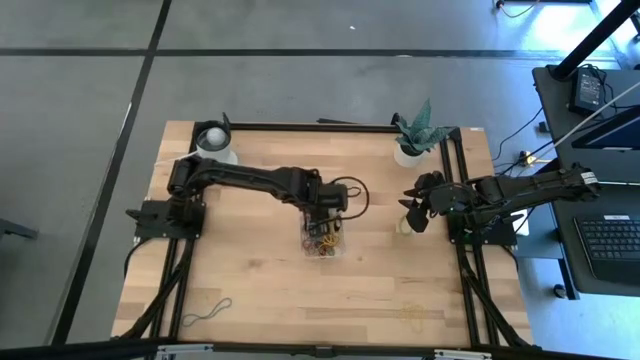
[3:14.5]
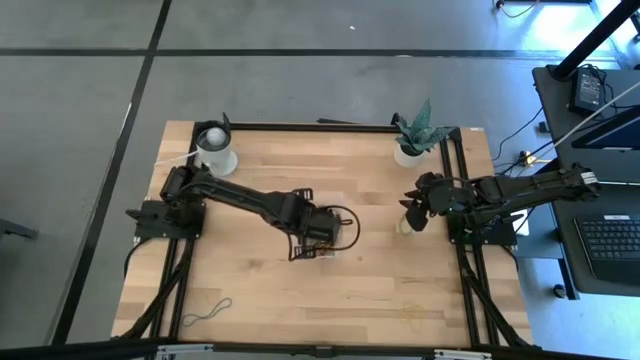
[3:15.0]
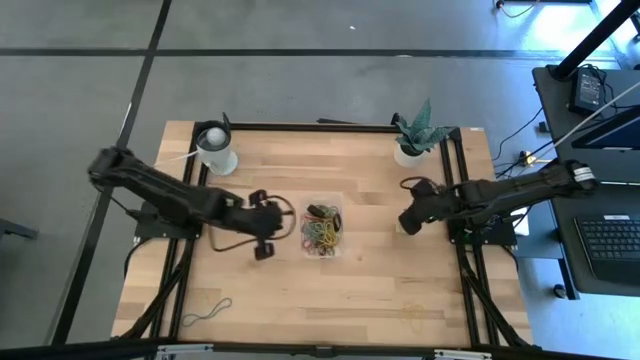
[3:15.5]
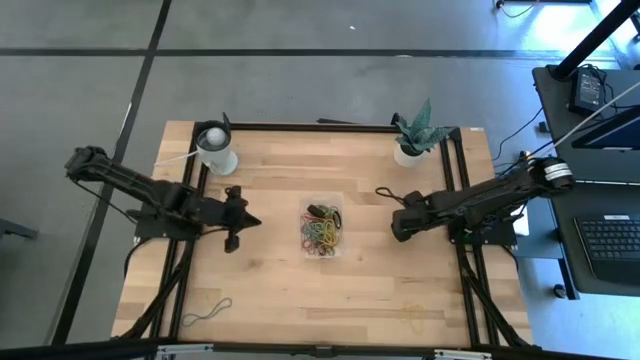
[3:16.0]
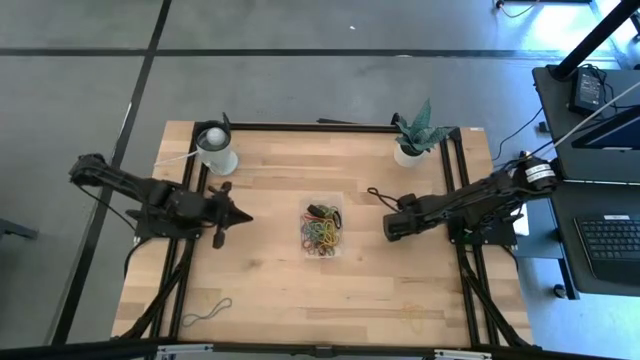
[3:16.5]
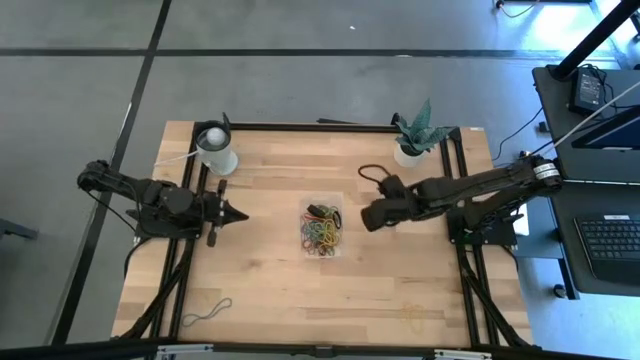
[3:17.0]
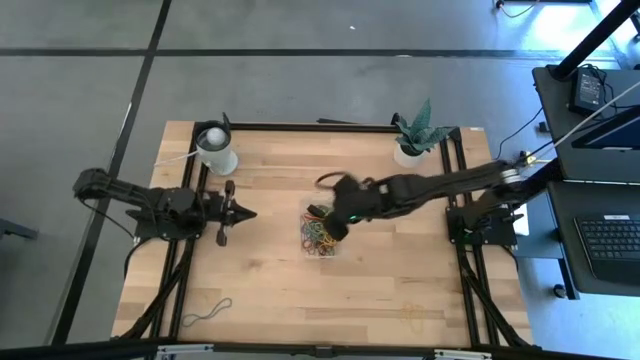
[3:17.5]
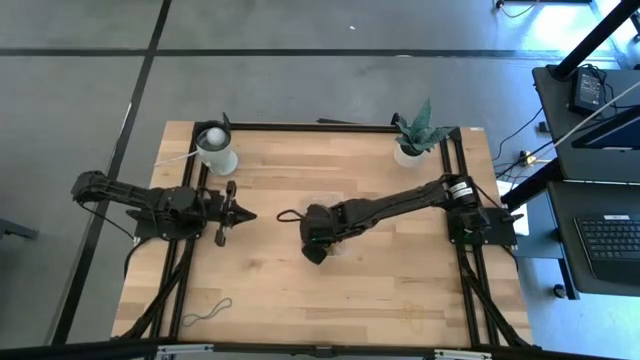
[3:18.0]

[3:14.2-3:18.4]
Task: Pick and place rubber bands into bin
Put the green rubber band into the transparent bin

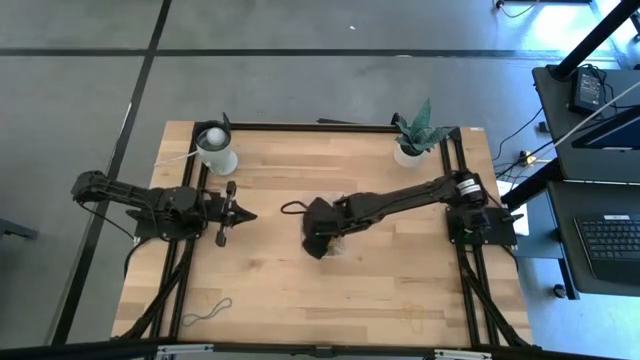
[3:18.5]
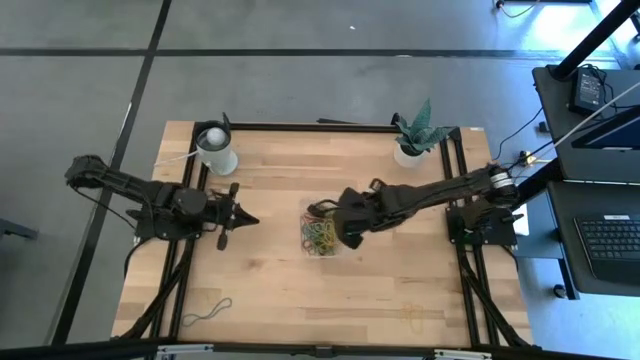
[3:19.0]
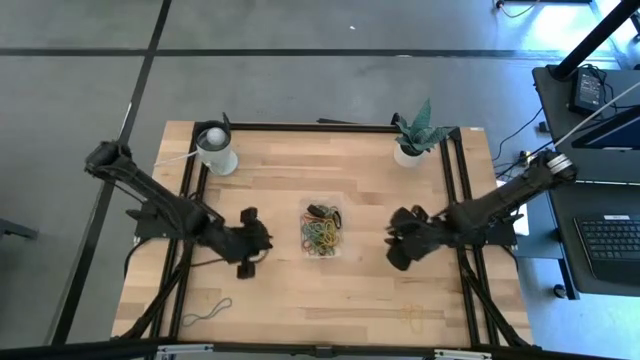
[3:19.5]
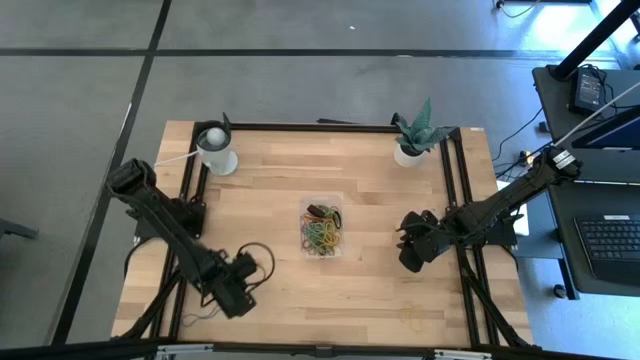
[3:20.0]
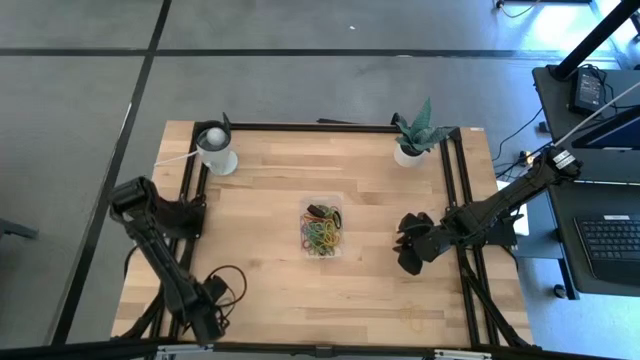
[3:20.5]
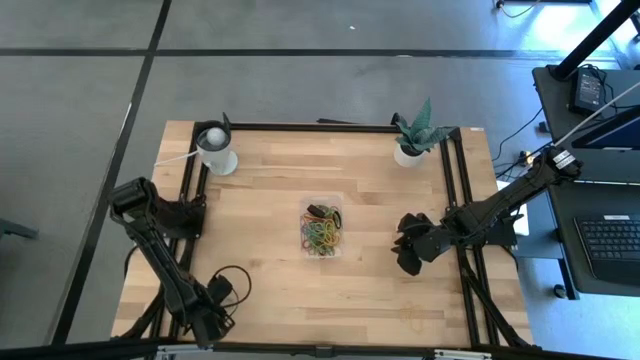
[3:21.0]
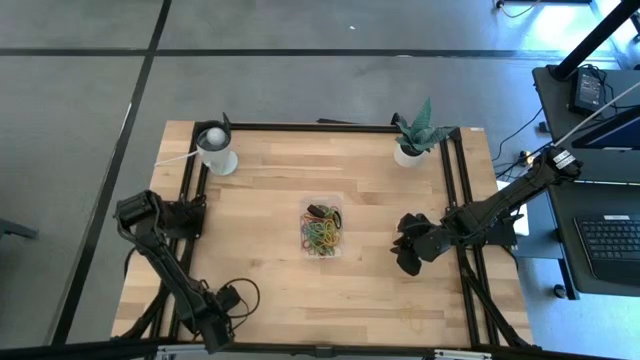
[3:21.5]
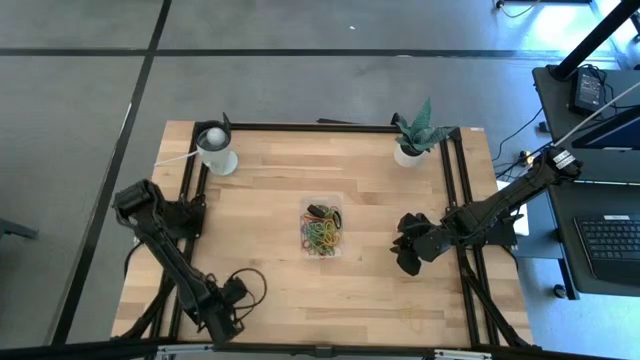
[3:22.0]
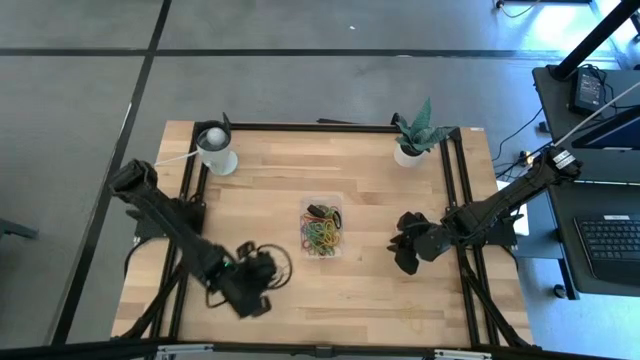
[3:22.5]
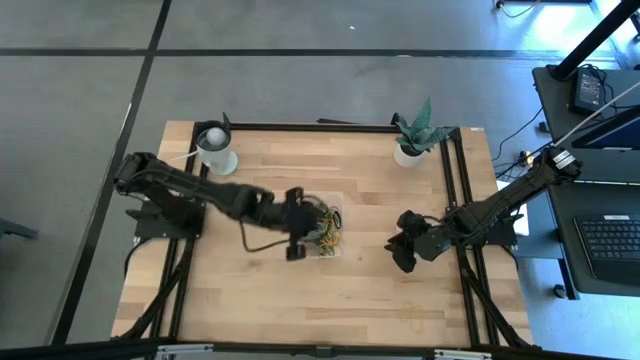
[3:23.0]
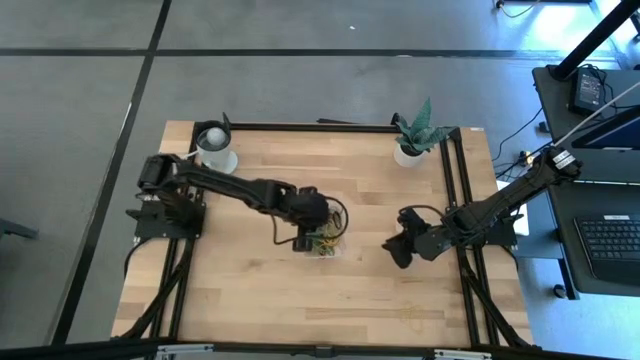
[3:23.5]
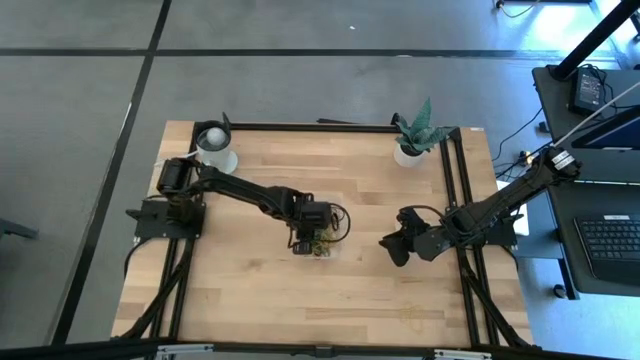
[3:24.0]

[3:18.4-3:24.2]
Put the blue rubber band into the transparent bin

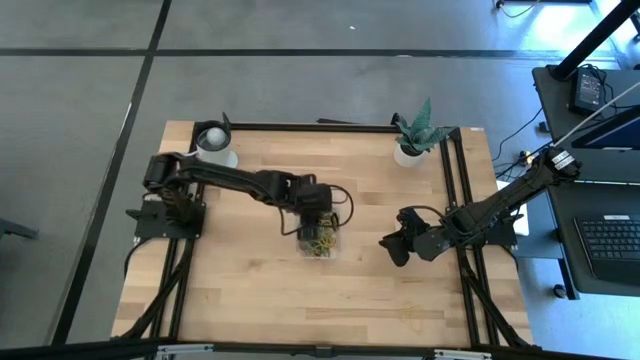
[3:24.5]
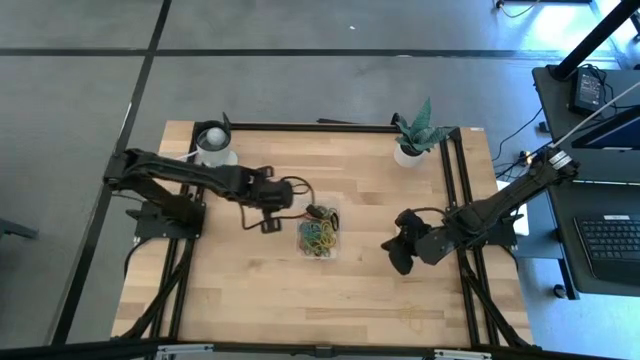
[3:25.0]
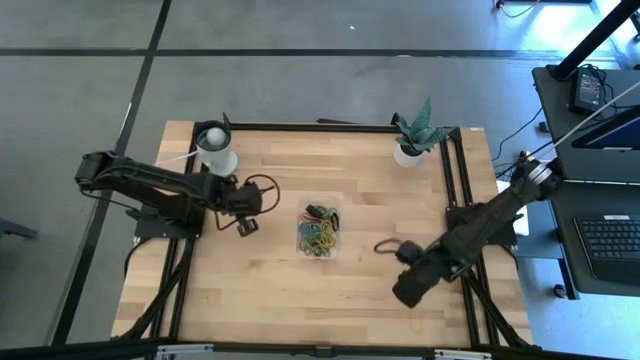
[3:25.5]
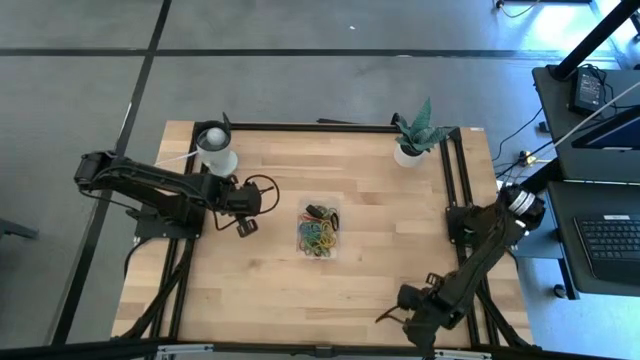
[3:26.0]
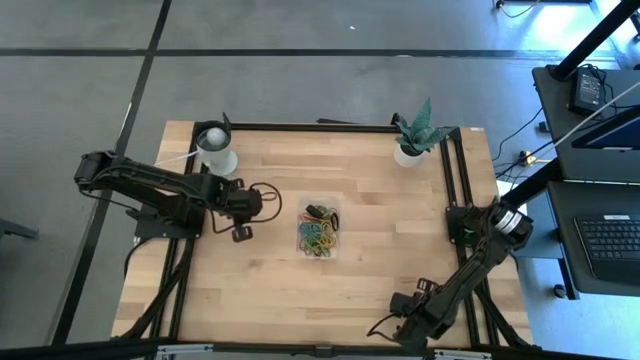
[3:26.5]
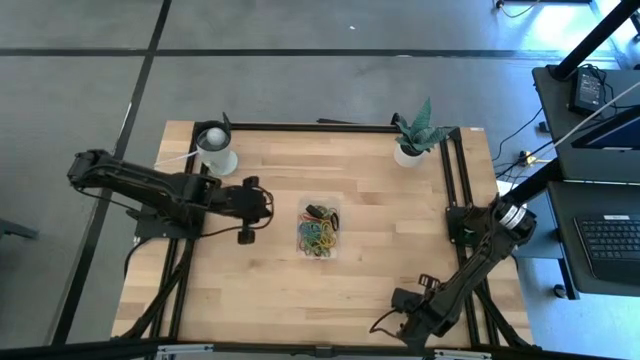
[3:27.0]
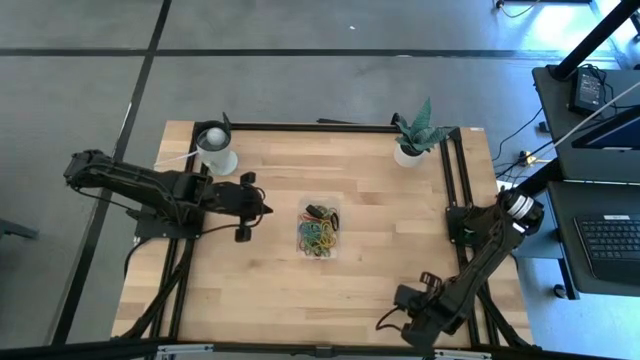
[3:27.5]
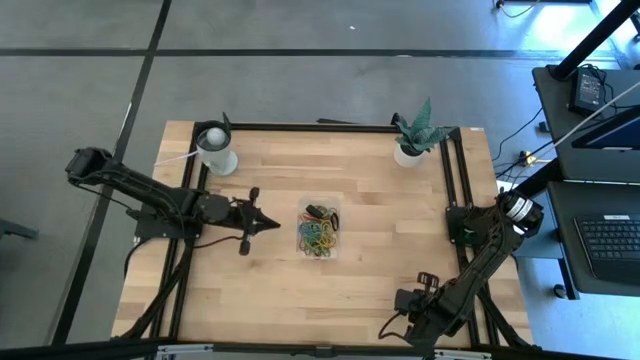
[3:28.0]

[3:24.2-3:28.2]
Put the yellow rubber band into the transparent bin

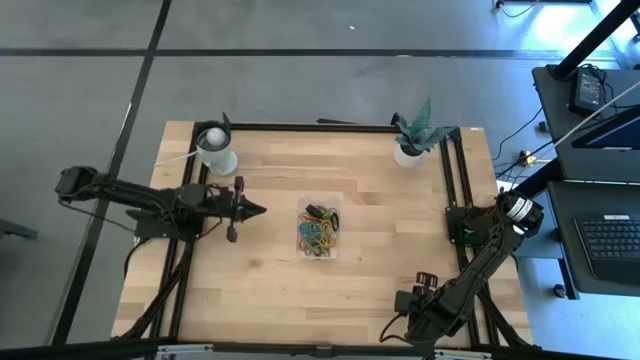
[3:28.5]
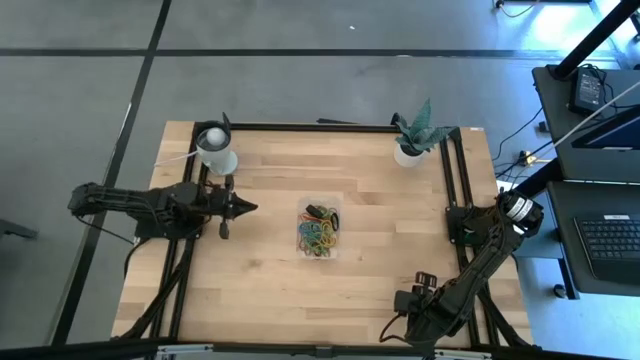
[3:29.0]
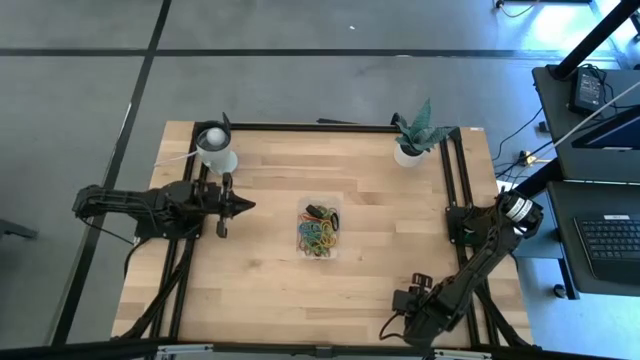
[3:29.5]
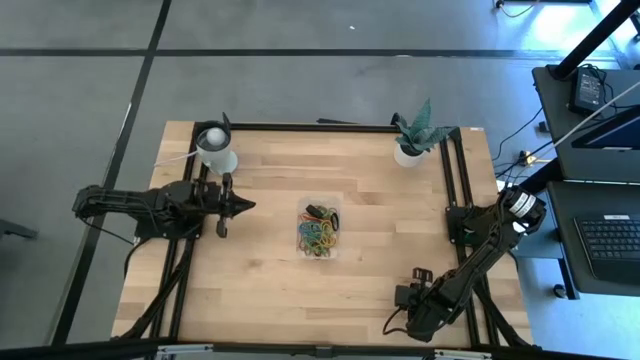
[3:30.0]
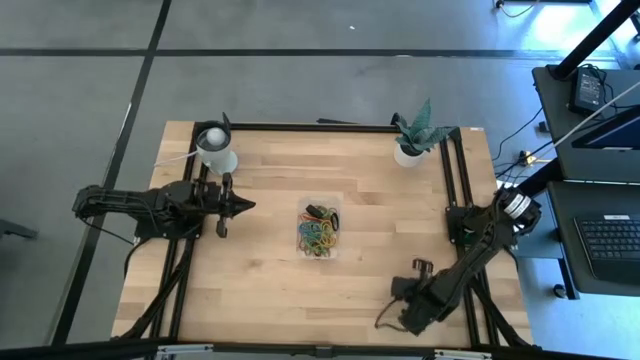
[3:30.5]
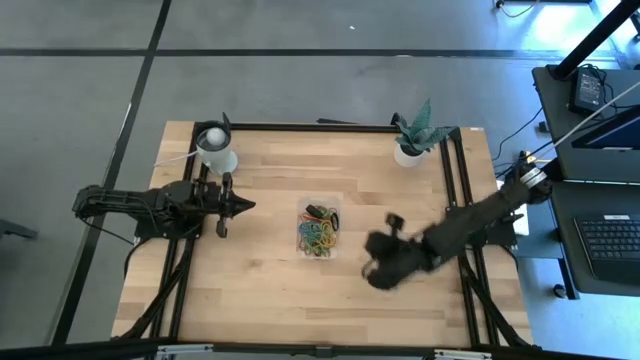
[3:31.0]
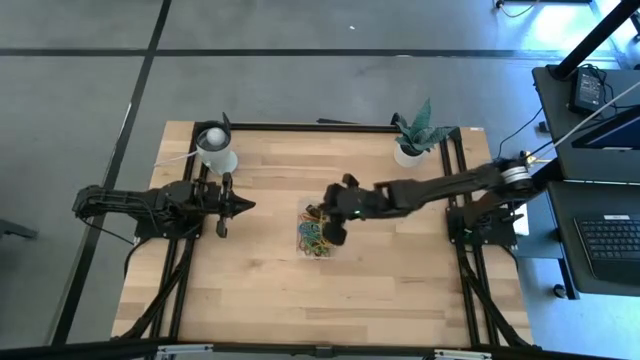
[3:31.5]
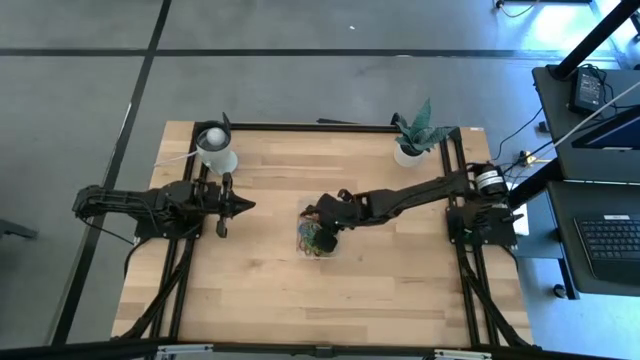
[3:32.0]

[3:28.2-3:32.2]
Put the yellow rubber band into the transparent bin

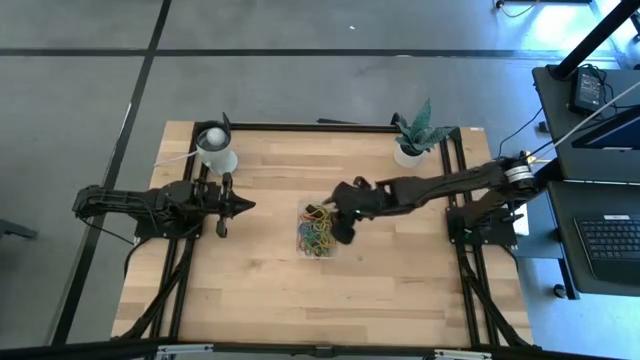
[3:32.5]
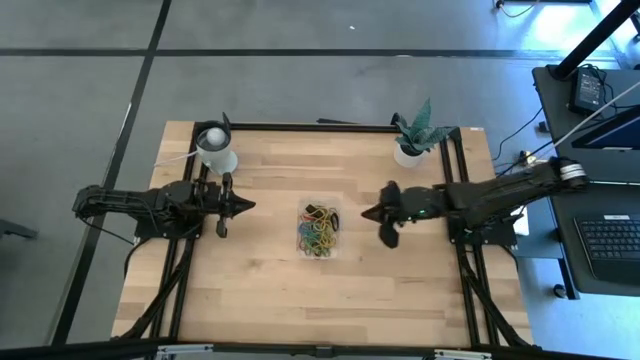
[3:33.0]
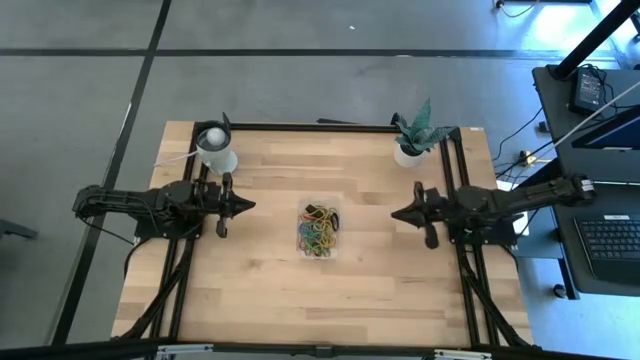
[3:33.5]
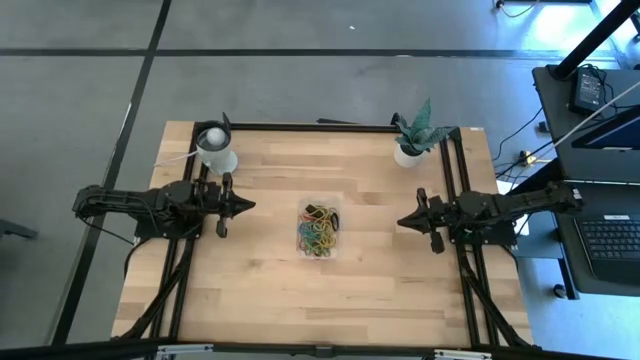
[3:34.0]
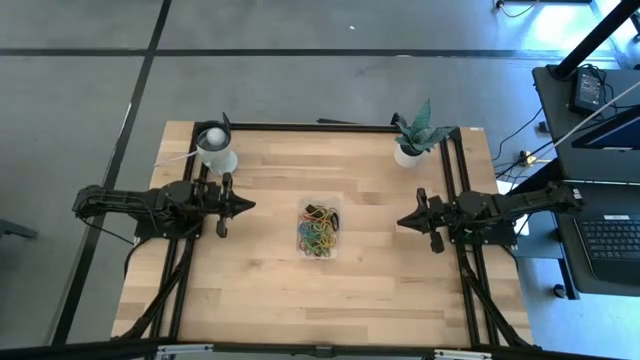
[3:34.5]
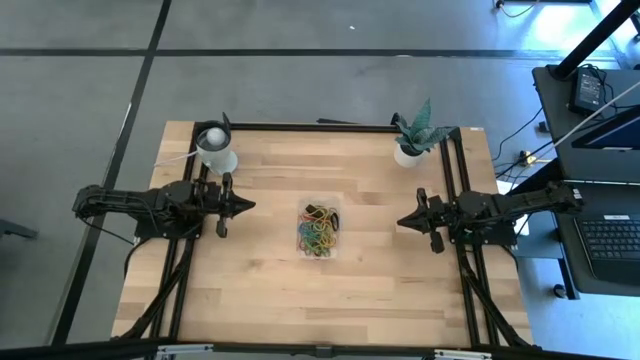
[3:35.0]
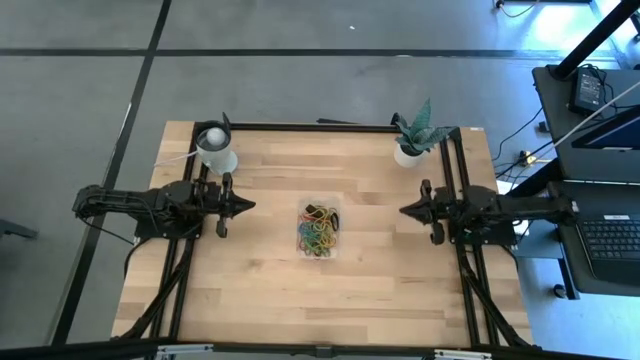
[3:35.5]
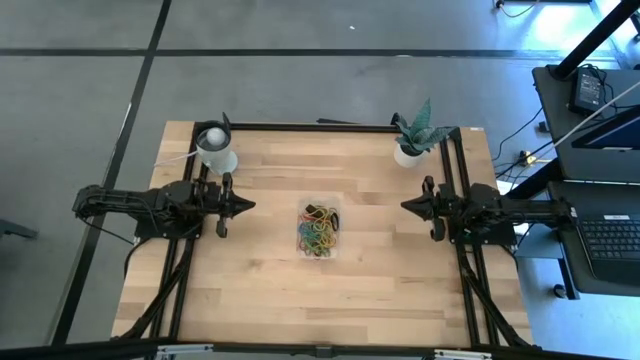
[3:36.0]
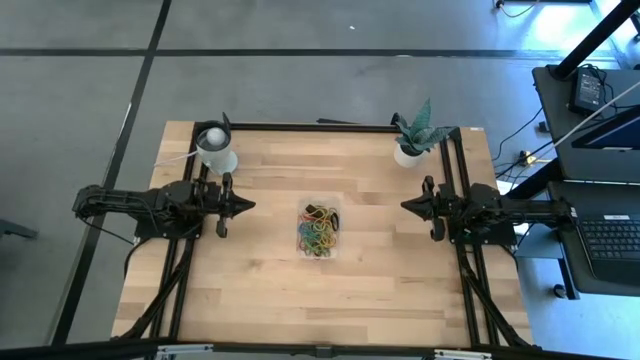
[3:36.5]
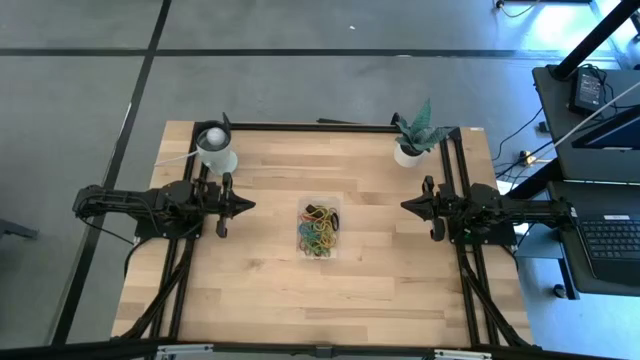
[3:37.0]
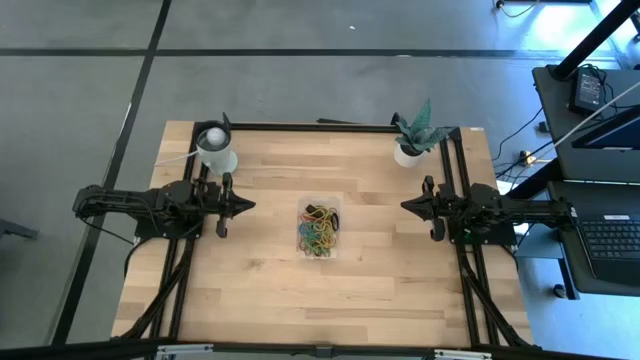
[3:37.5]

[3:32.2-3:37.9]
Return to Home Position
